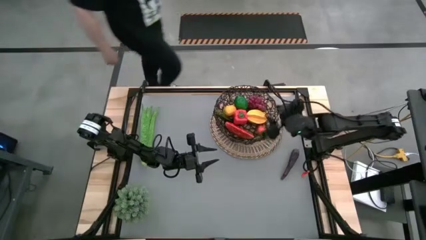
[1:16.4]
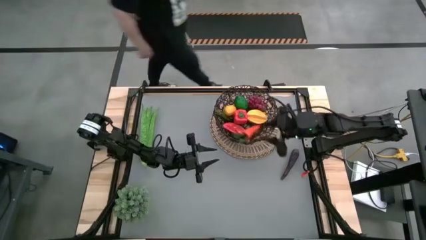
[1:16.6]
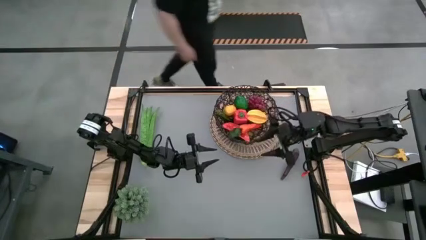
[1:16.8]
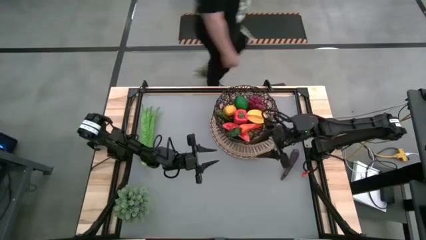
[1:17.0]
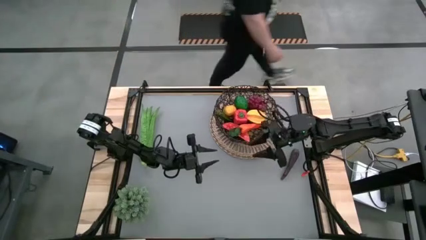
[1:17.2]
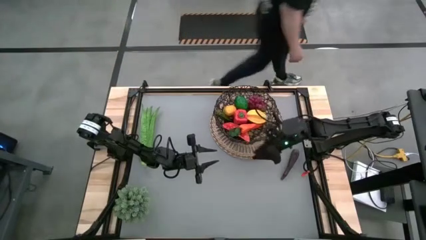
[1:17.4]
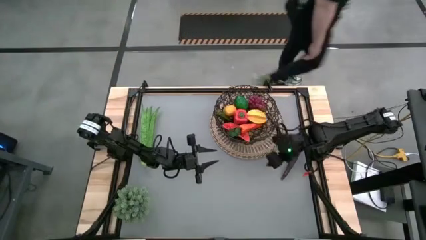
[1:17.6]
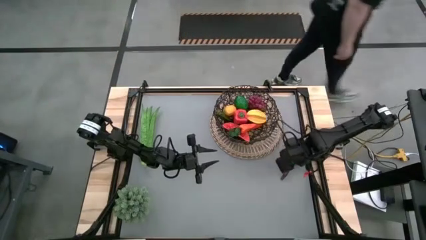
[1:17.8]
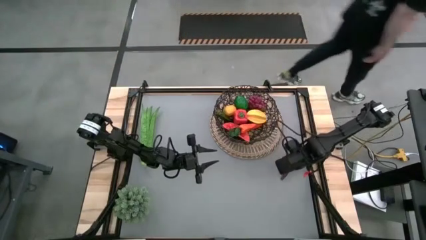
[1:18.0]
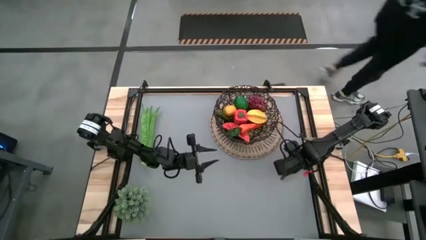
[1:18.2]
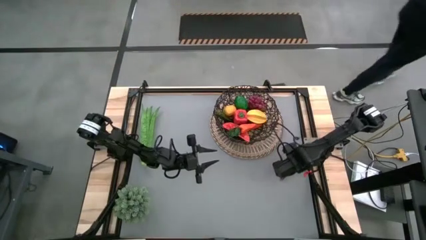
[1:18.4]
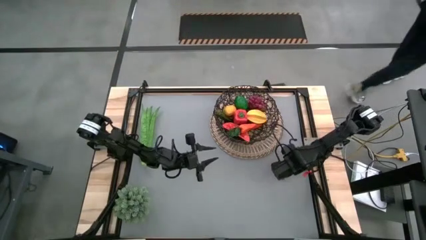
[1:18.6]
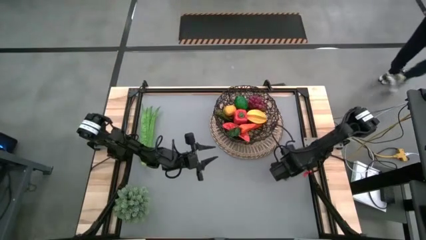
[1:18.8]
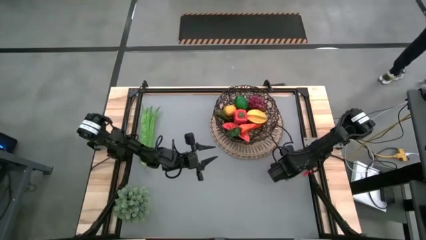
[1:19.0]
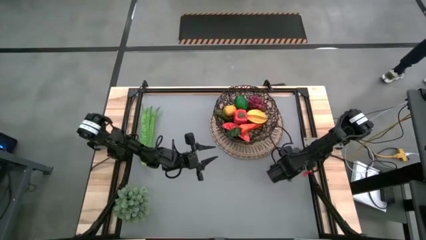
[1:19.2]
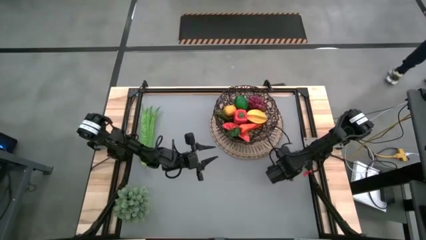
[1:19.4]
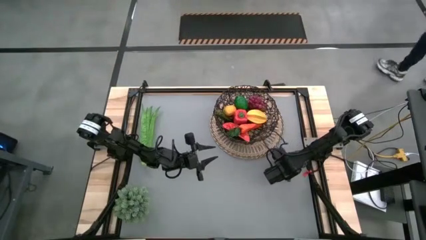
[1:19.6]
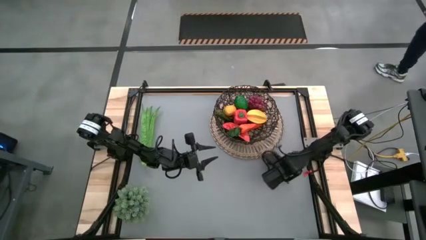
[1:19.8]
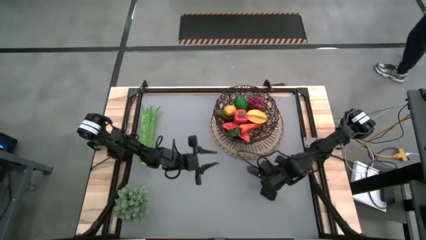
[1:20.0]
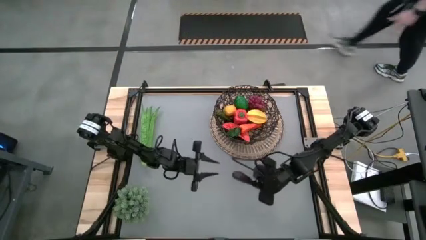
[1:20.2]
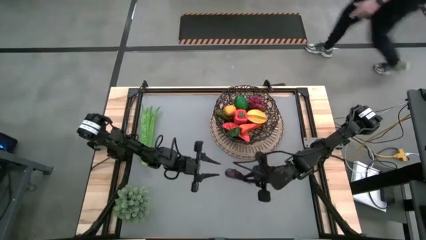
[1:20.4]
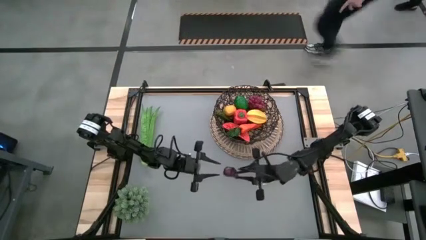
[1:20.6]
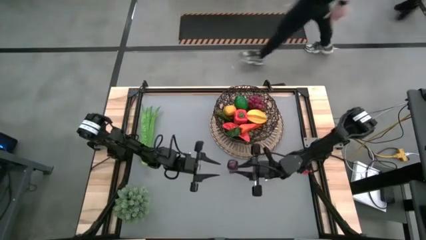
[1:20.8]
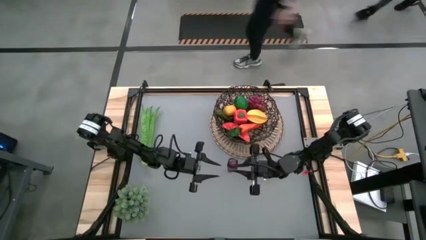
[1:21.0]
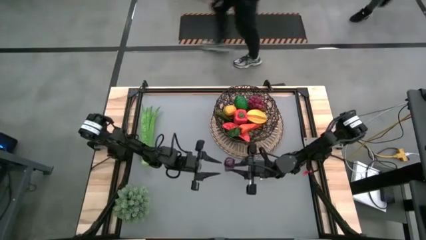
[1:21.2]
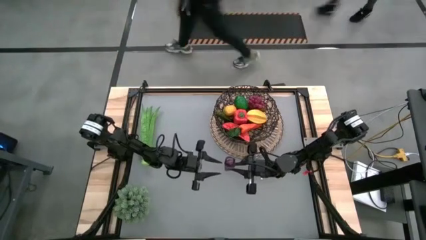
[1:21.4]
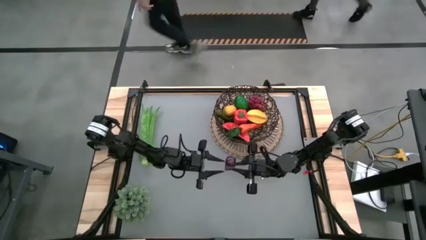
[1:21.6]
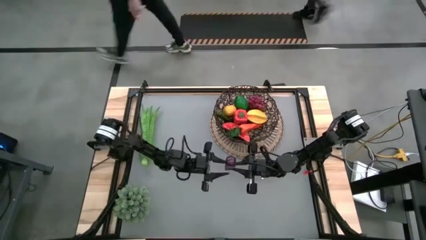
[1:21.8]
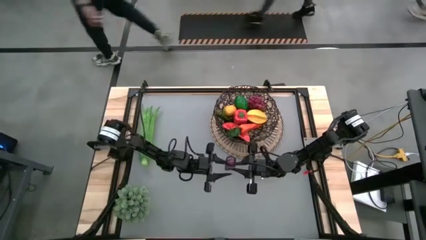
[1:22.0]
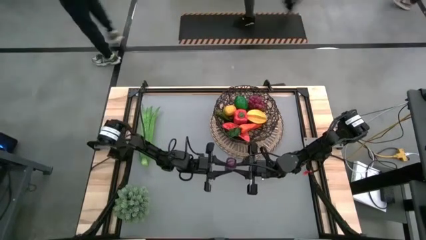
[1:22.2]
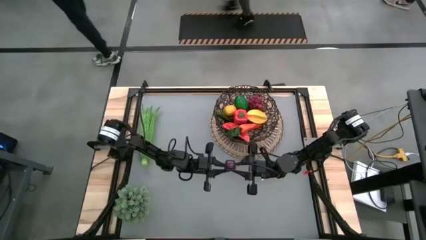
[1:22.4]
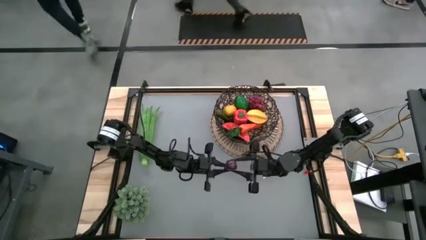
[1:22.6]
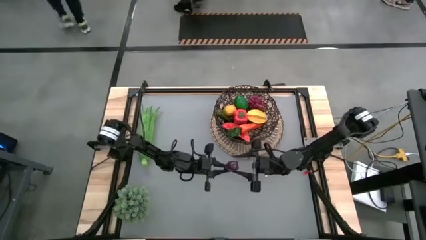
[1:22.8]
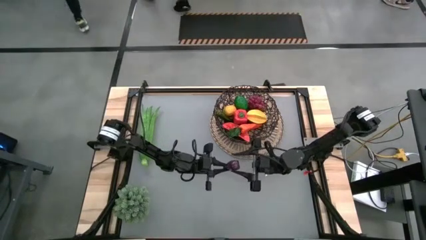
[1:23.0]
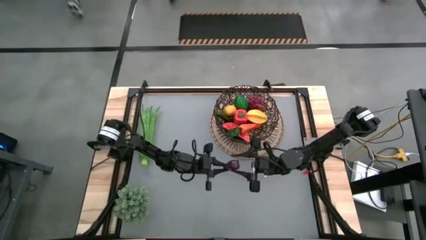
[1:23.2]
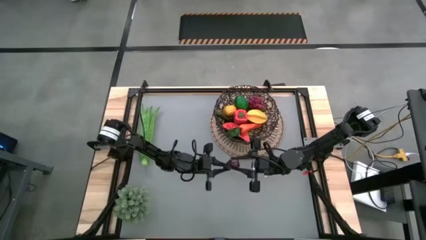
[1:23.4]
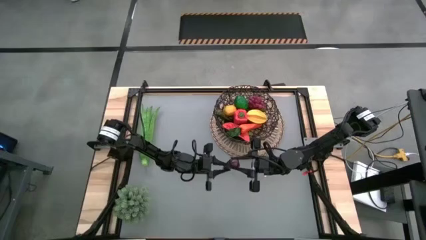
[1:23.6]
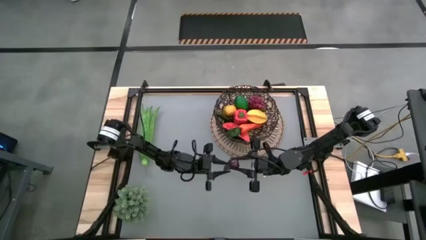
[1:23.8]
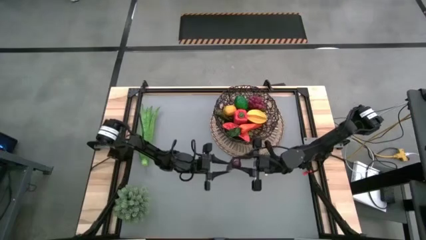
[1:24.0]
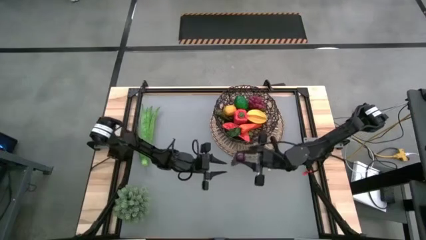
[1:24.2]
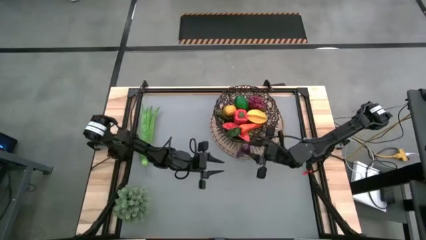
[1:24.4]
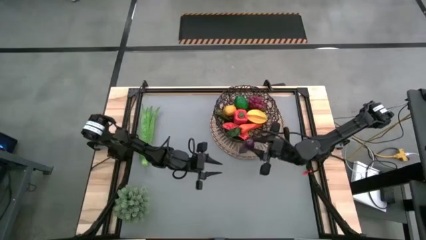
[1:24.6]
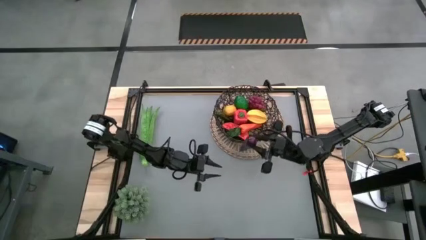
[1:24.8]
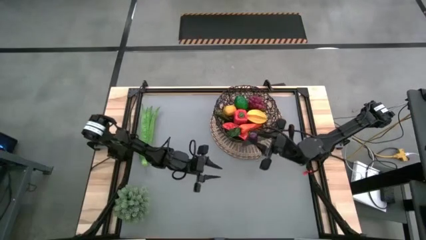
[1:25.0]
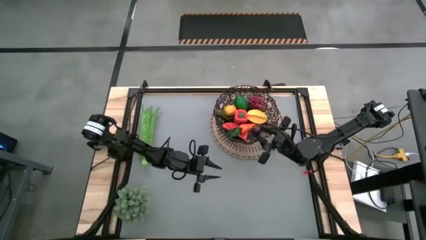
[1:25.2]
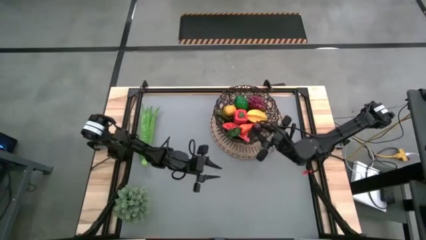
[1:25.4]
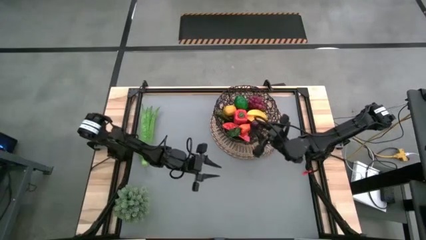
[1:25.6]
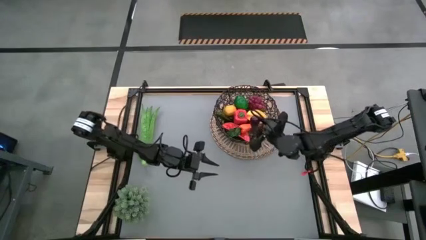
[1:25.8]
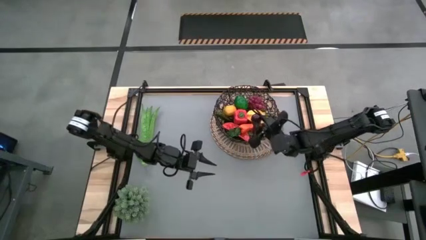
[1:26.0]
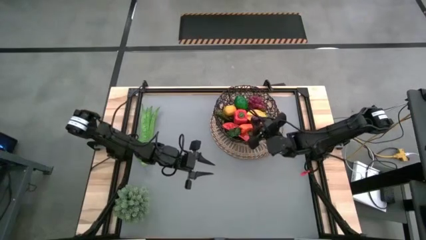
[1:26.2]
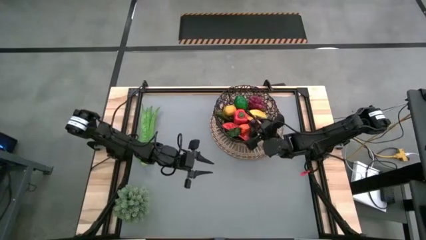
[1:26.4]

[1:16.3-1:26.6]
Task: Build produce basket
Put the violet eggplant into the basket
